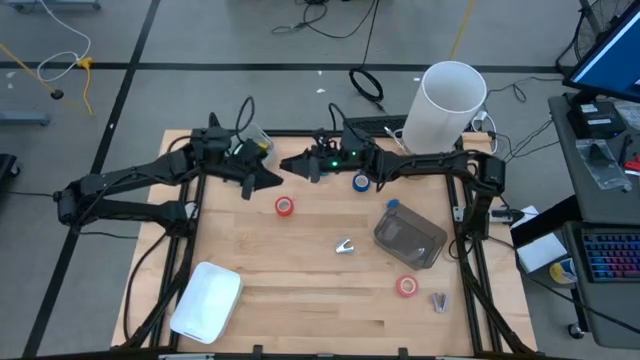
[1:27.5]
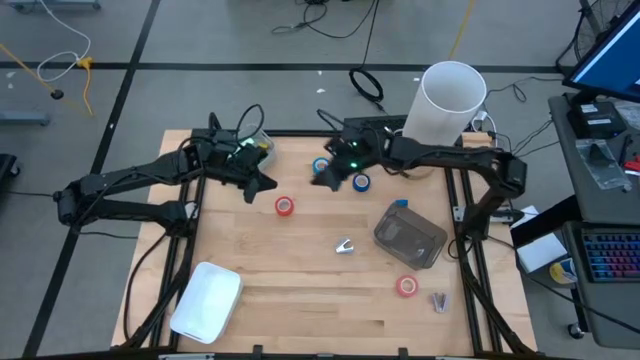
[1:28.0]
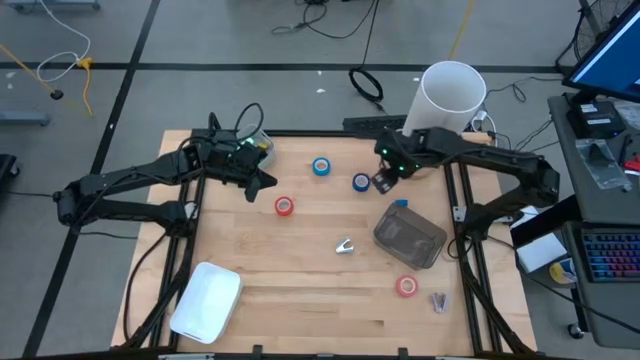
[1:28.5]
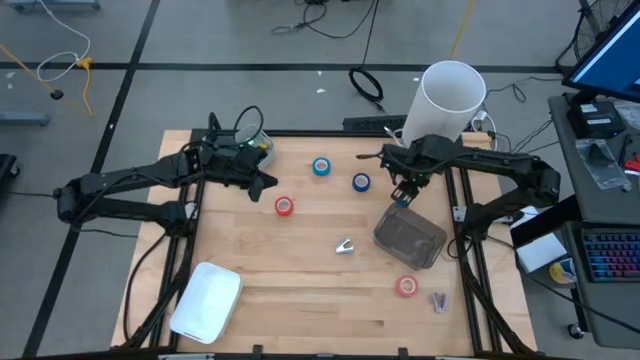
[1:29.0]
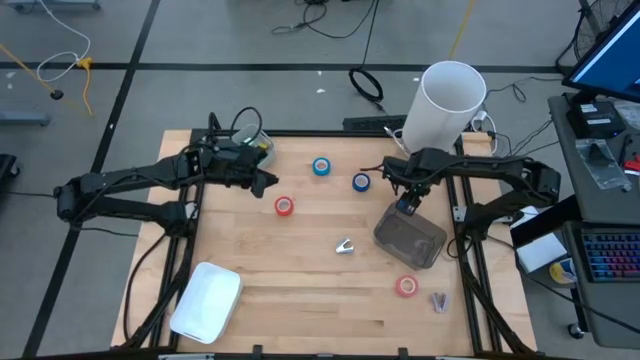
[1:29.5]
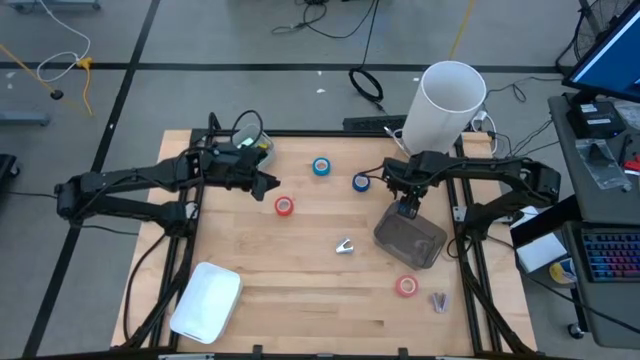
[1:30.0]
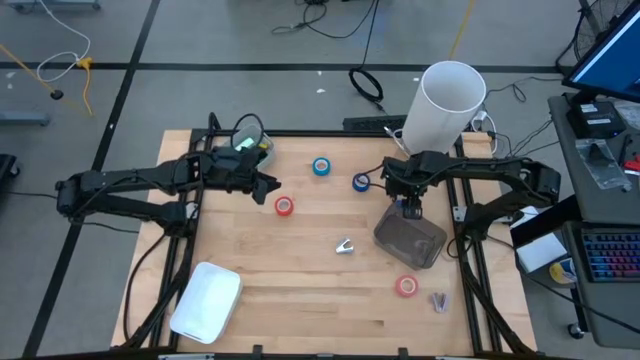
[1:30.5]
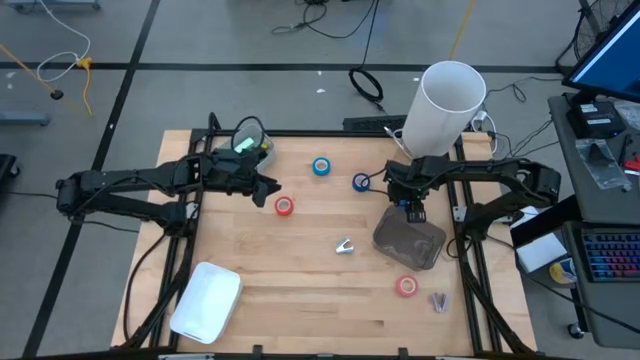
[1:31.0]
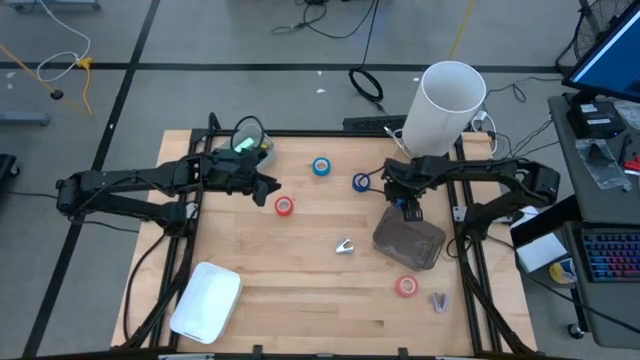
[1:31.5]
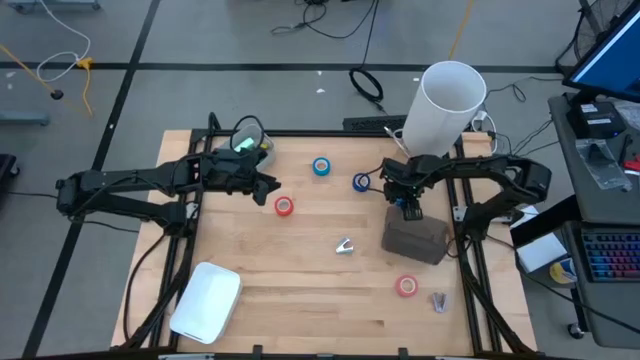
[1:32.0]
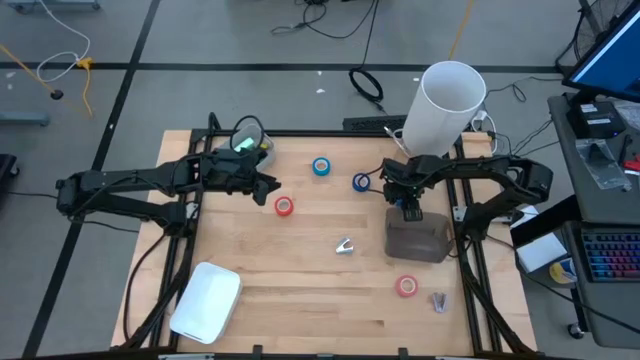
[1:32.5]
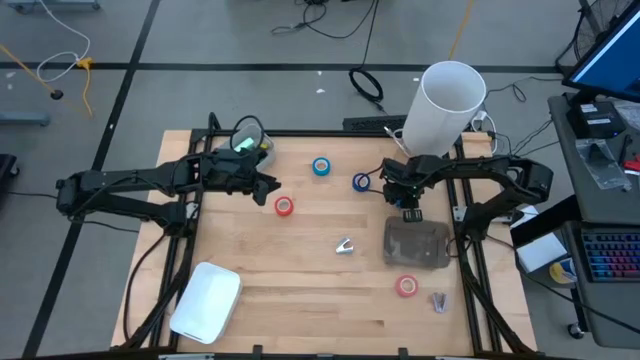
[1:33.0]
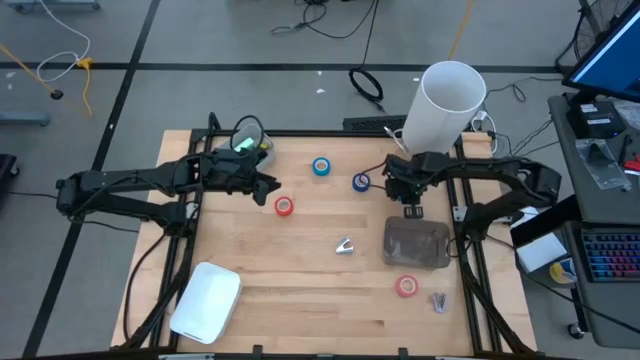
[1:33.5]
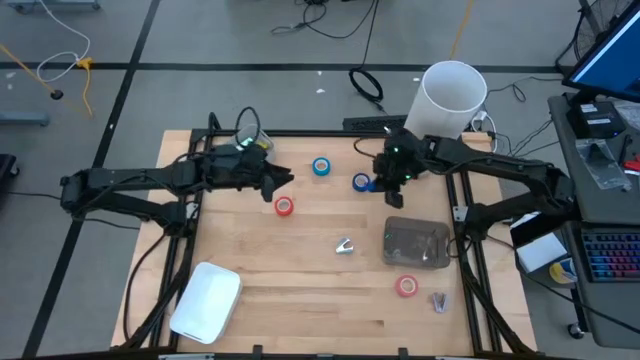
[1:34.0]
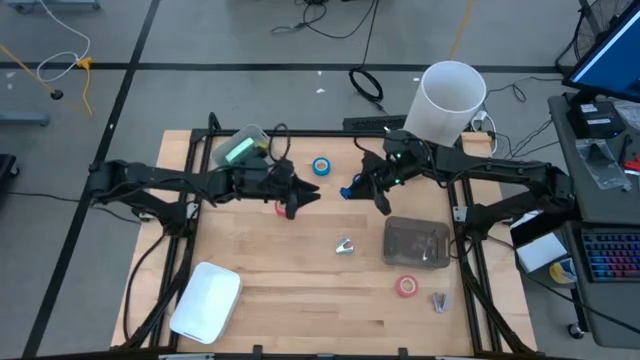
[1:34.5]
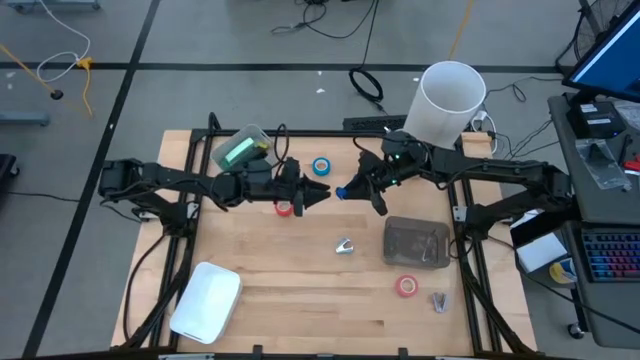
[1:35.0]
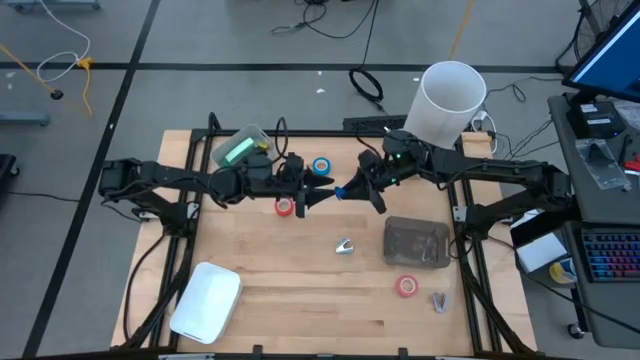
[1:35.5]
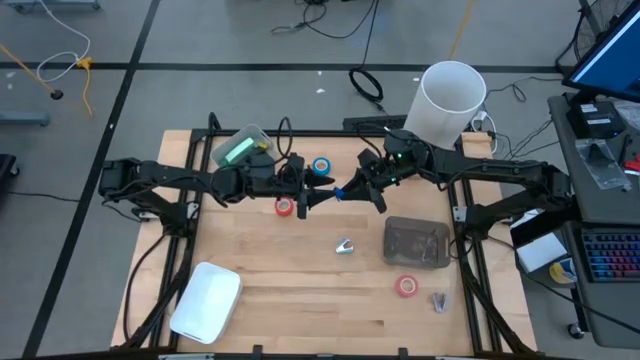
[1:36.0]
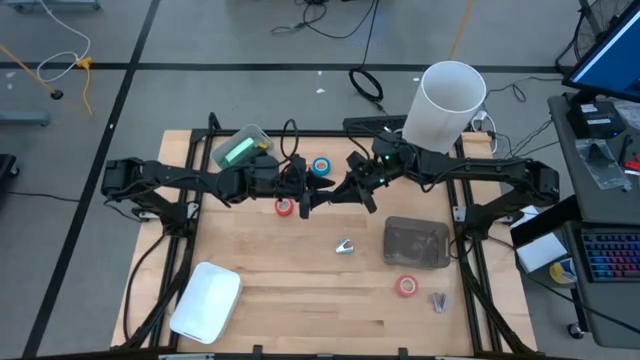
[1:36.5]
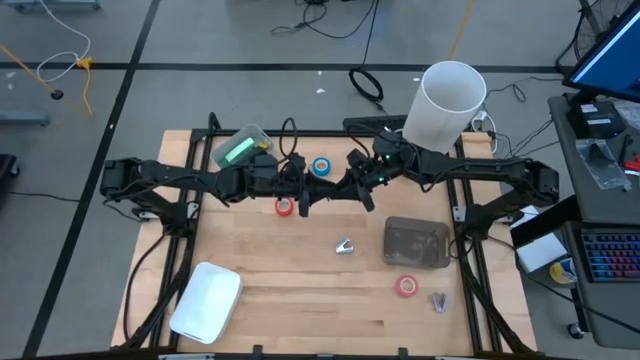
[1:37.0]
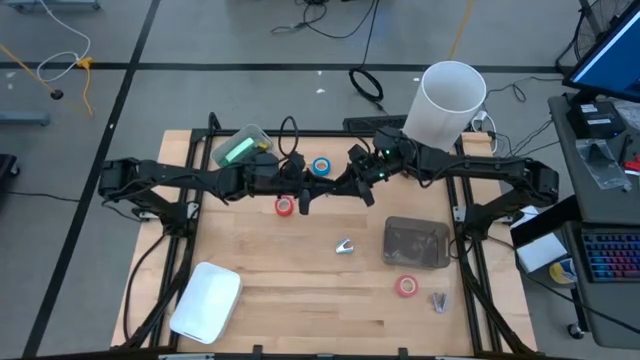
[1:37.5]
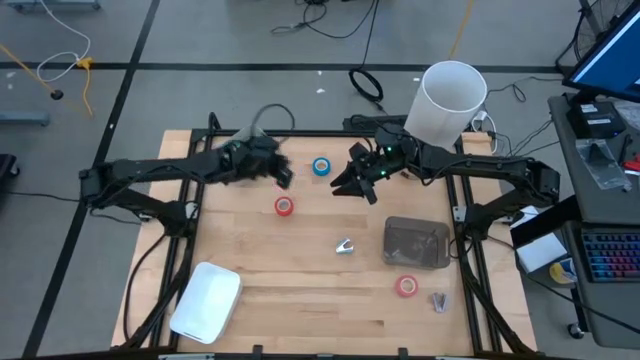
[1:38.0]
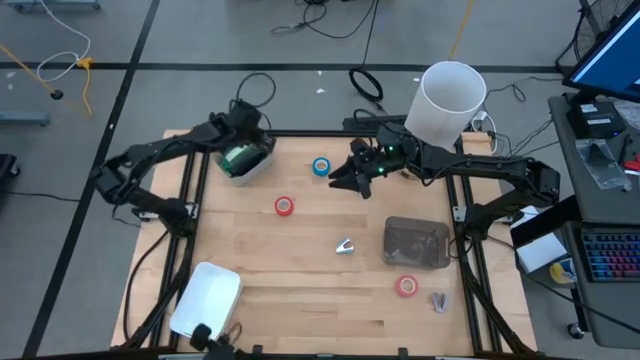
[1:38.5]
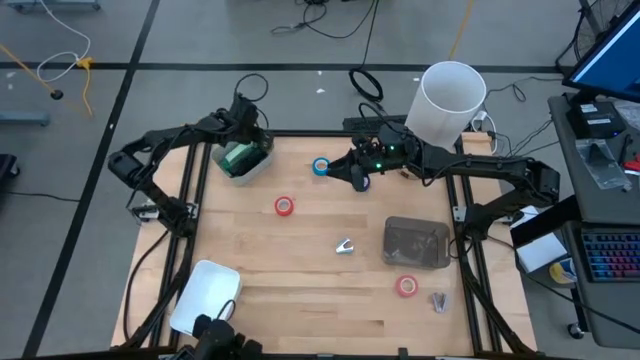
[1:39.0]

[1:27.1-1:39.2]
Task: Pick and place Stapler, Stapler remover, tape
Put the small blue stapler into the gray bin

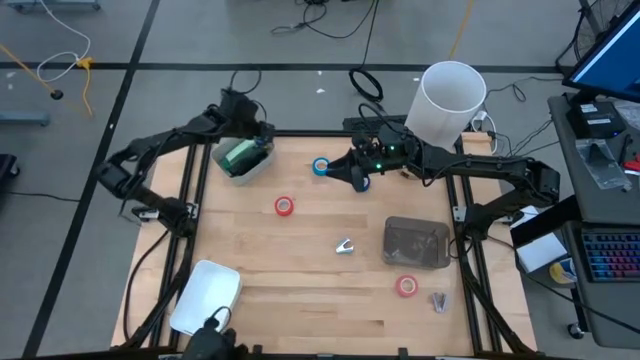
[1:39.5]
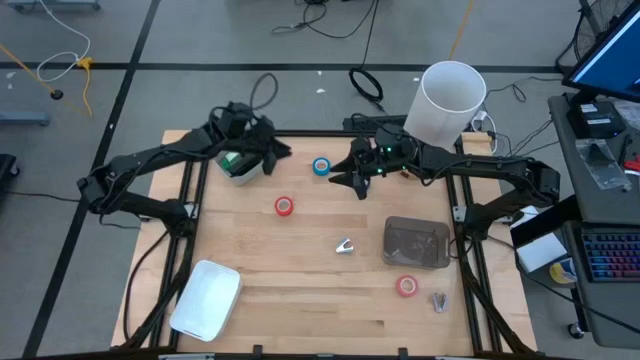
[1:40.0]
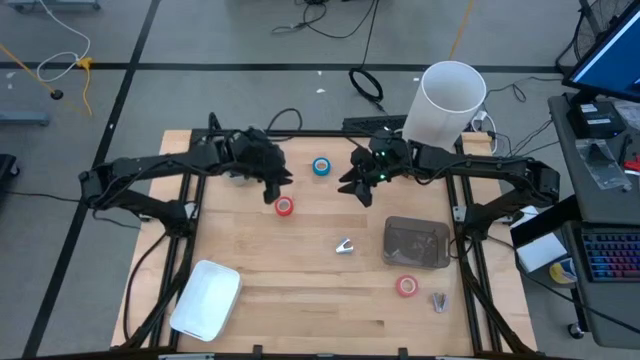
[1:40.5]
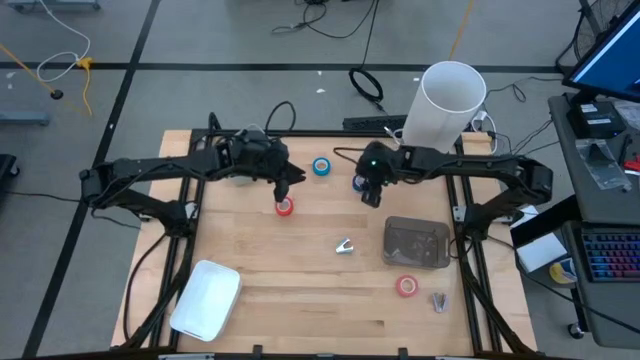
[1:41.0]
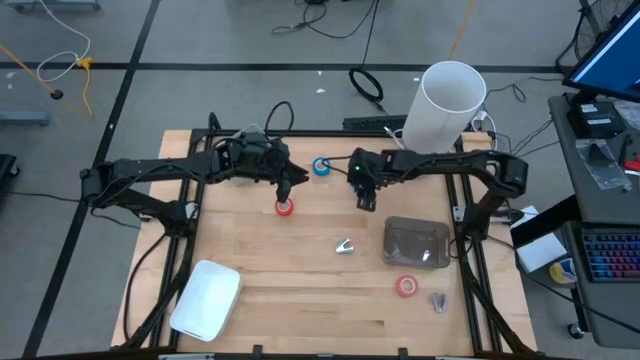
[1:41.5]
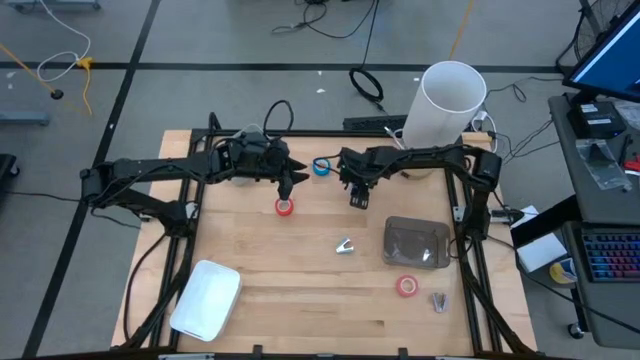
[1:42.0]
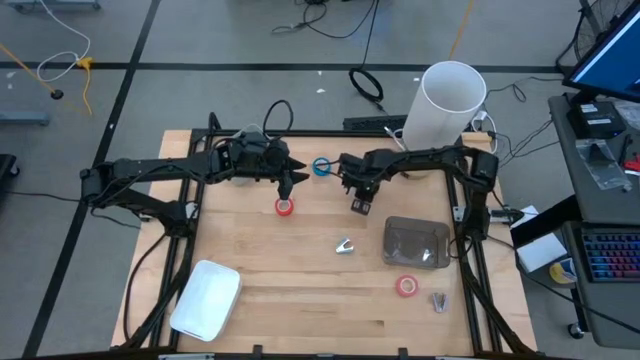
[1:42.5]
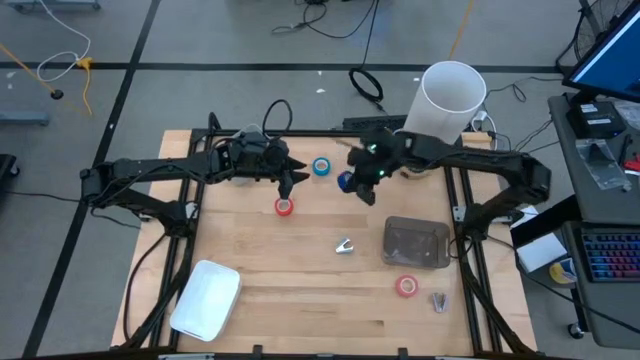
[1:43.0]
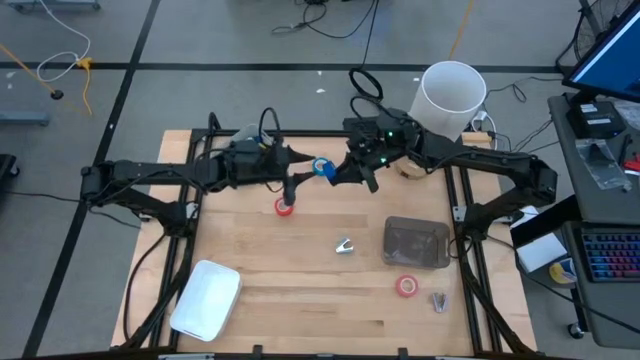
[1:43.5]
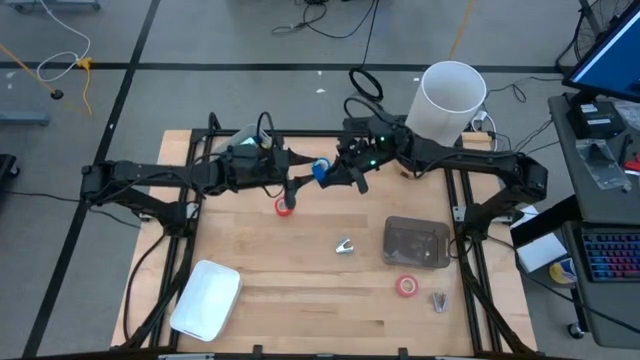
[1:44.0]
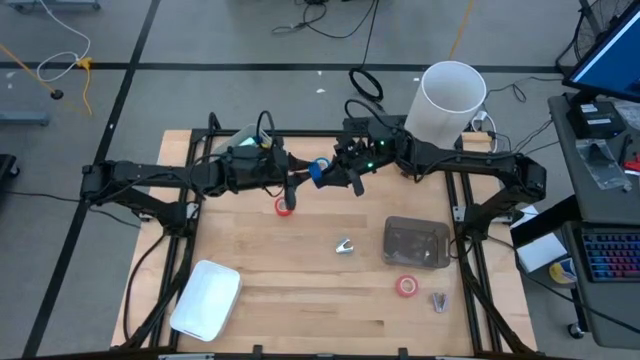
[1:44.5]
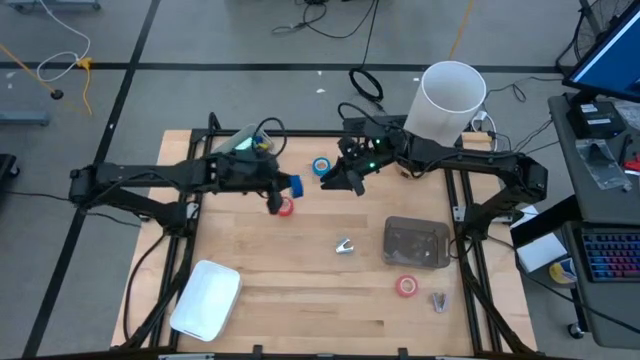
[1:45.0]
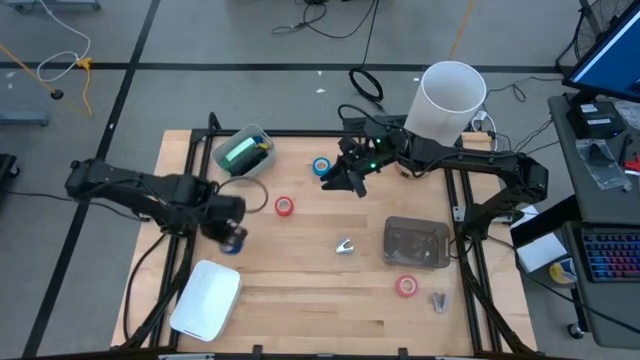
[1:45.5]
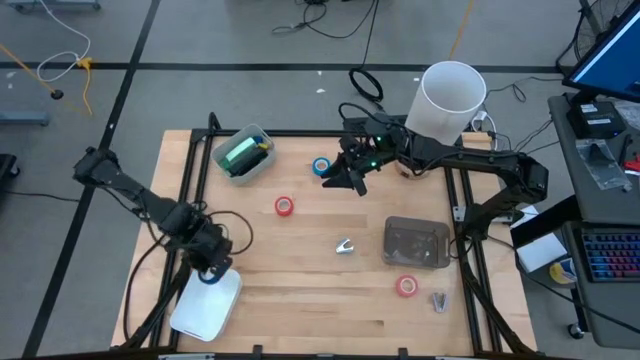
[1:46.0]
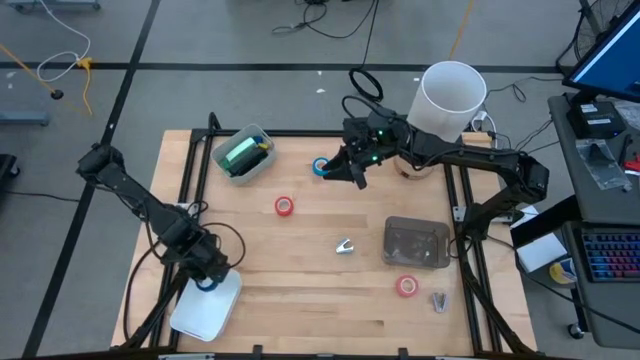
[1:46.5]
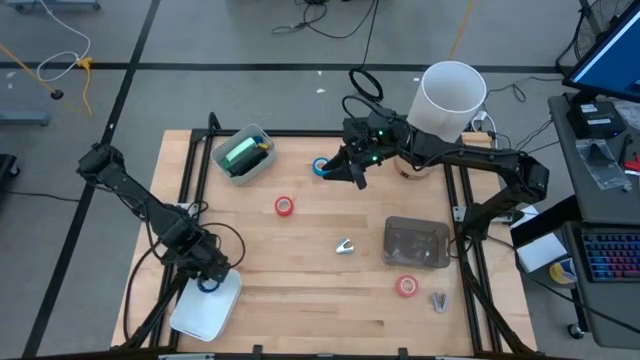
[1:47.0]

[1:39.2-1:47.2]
Put the blue tape into the white bin
